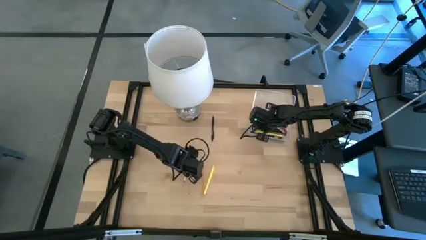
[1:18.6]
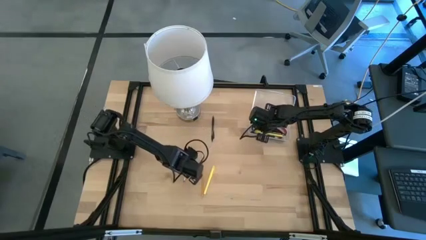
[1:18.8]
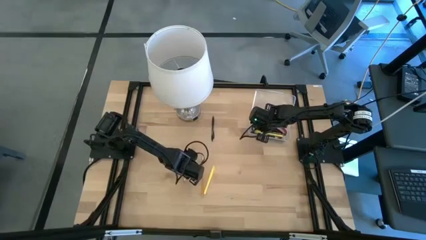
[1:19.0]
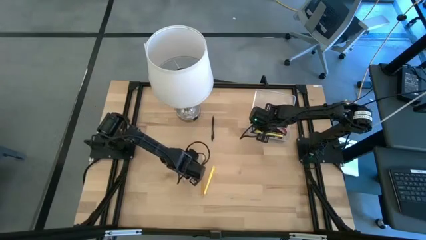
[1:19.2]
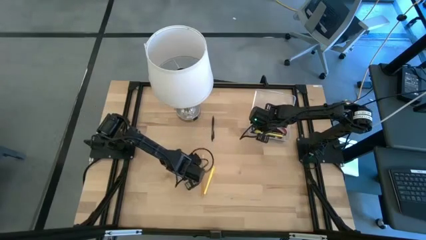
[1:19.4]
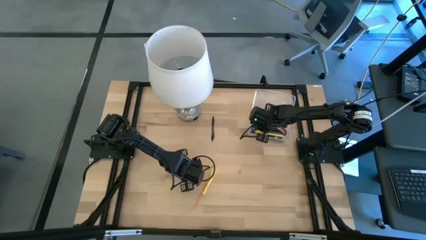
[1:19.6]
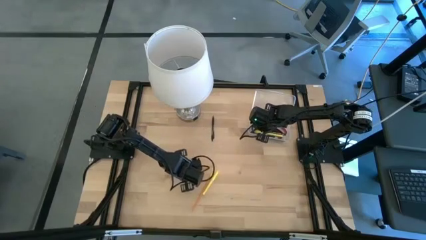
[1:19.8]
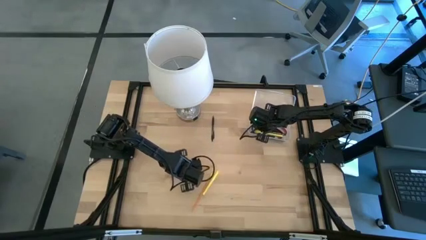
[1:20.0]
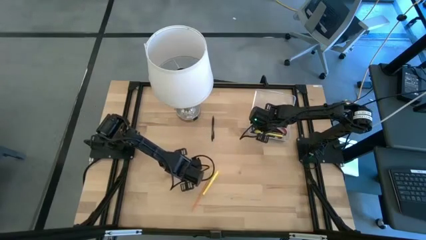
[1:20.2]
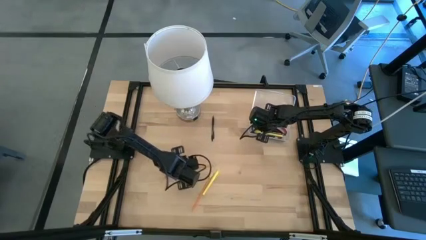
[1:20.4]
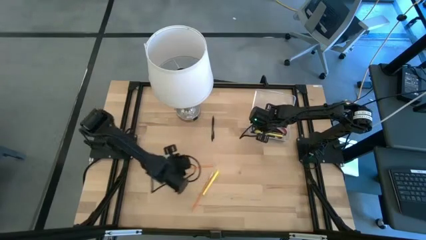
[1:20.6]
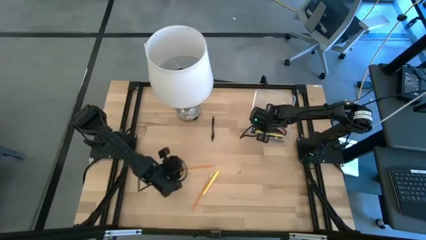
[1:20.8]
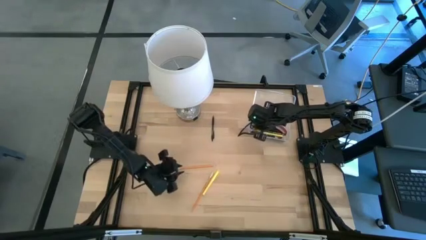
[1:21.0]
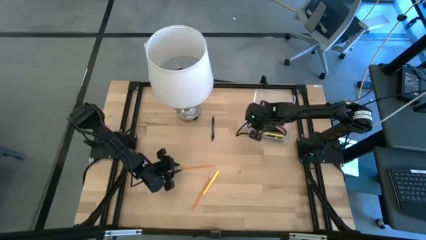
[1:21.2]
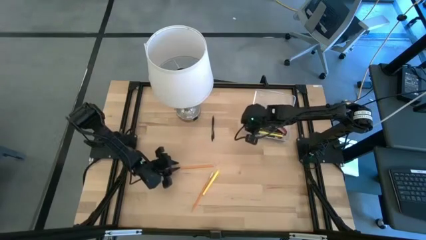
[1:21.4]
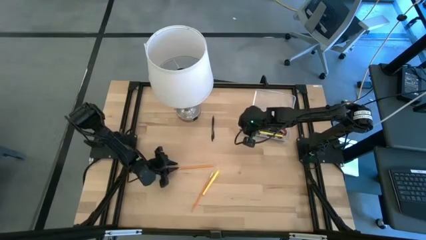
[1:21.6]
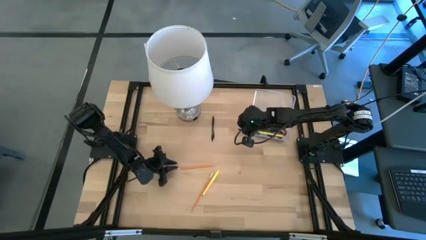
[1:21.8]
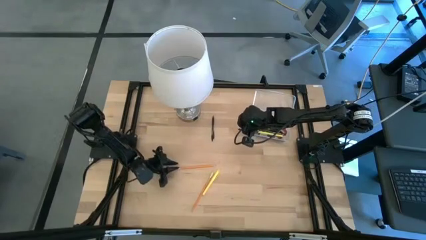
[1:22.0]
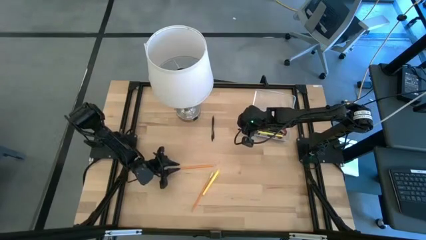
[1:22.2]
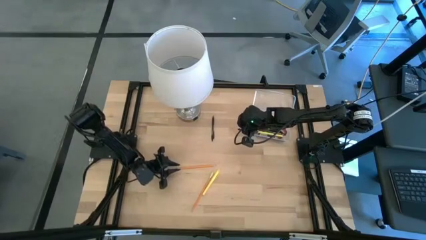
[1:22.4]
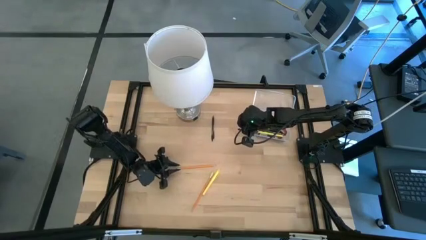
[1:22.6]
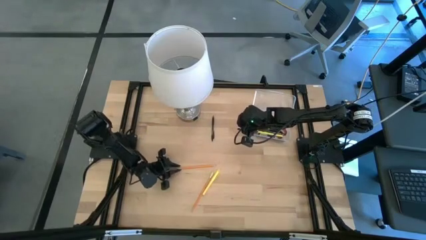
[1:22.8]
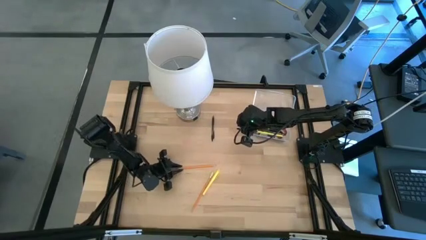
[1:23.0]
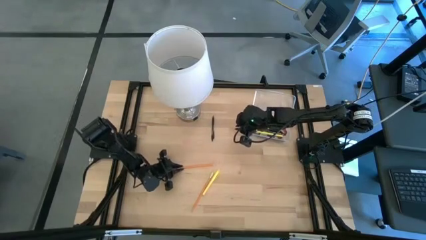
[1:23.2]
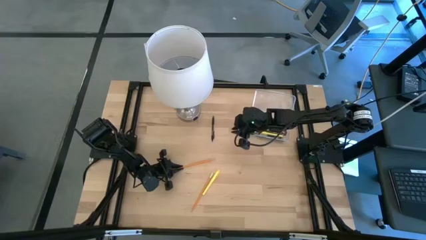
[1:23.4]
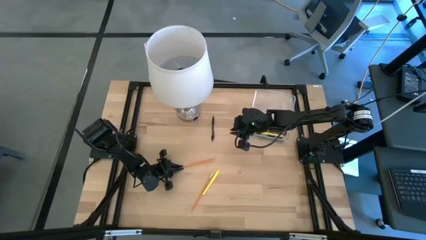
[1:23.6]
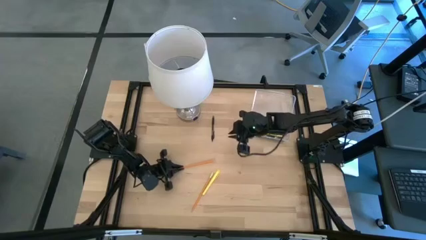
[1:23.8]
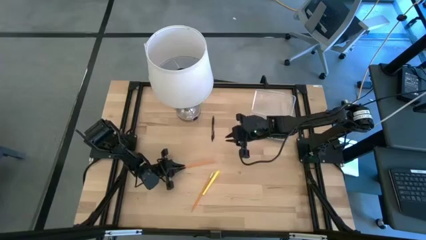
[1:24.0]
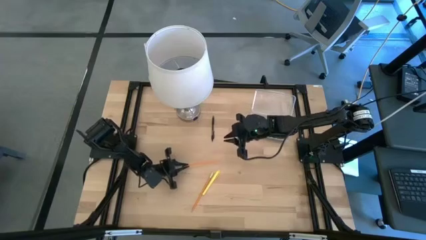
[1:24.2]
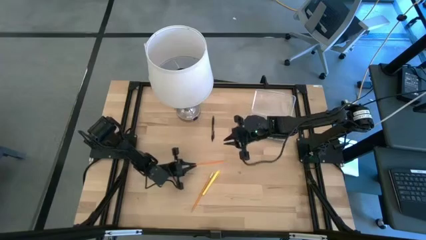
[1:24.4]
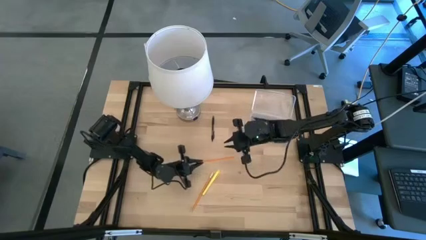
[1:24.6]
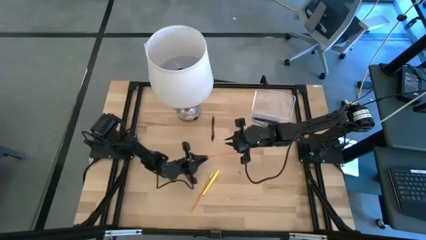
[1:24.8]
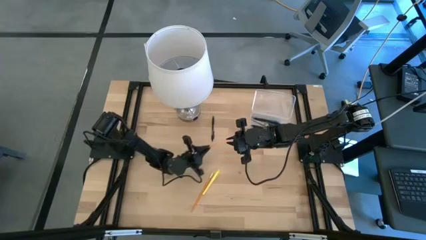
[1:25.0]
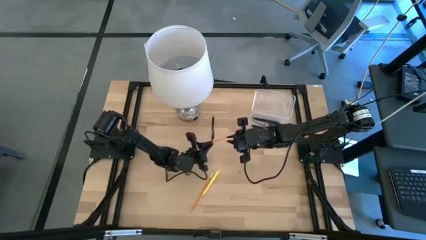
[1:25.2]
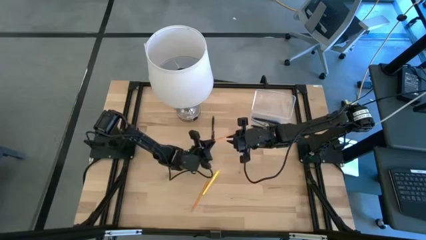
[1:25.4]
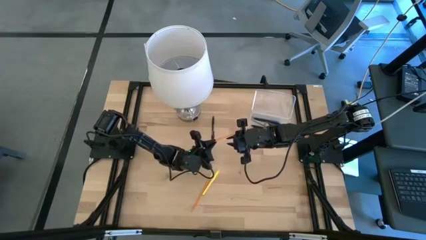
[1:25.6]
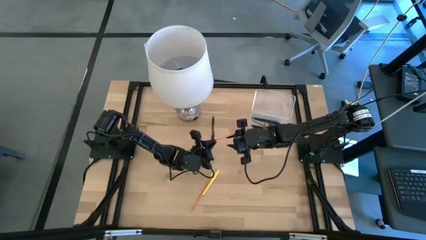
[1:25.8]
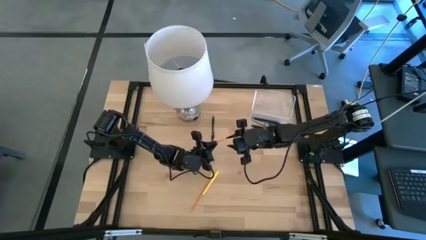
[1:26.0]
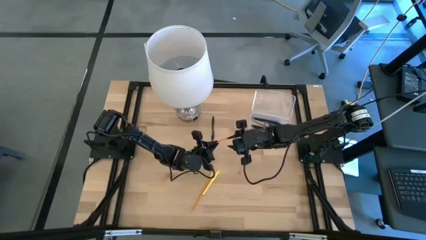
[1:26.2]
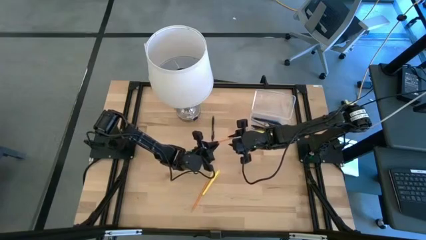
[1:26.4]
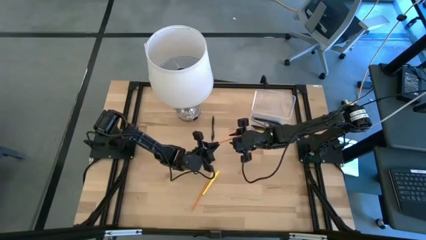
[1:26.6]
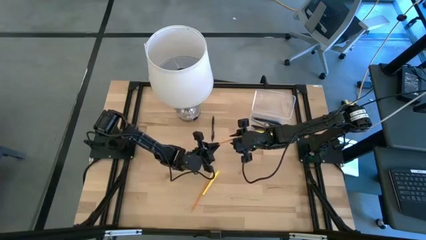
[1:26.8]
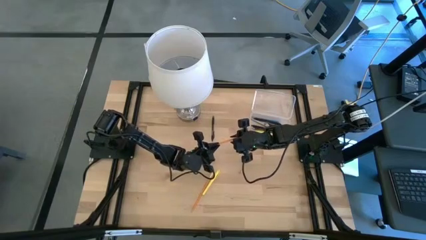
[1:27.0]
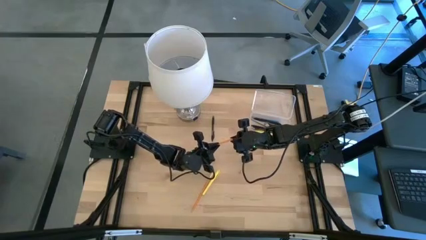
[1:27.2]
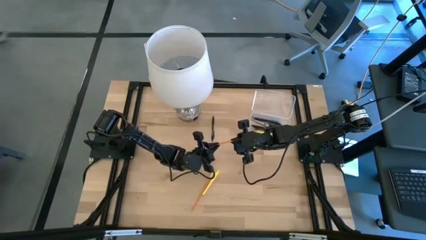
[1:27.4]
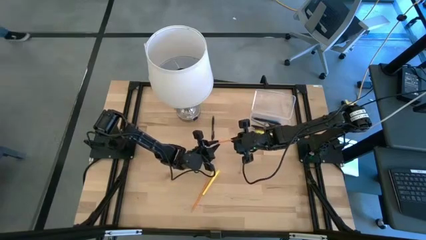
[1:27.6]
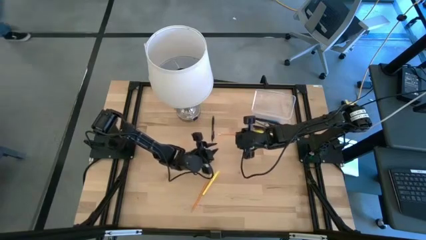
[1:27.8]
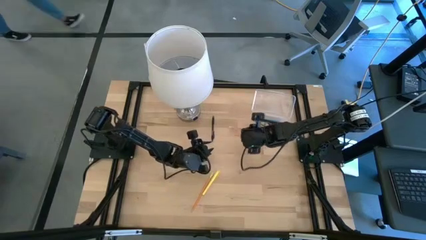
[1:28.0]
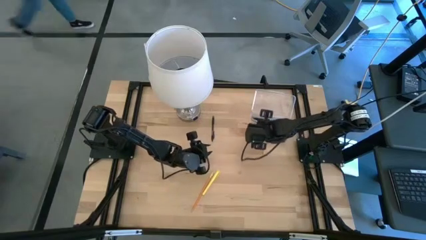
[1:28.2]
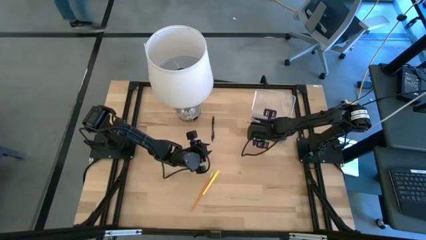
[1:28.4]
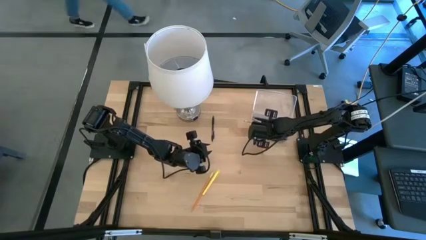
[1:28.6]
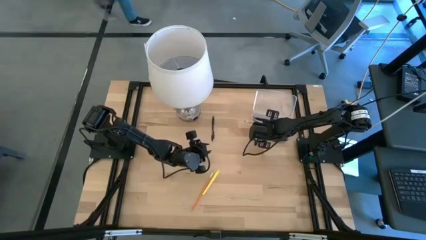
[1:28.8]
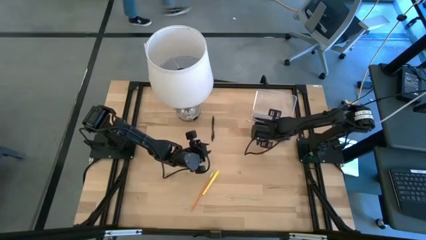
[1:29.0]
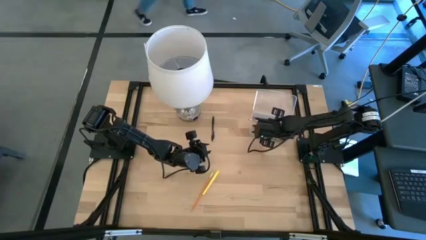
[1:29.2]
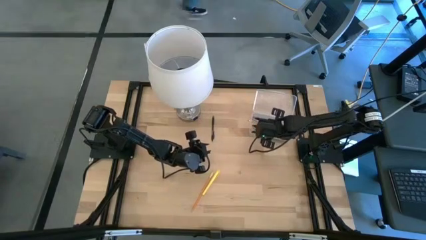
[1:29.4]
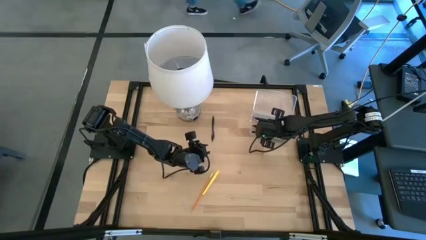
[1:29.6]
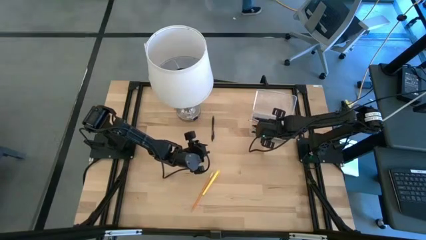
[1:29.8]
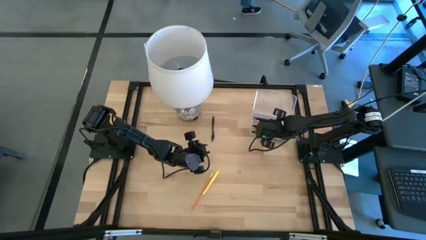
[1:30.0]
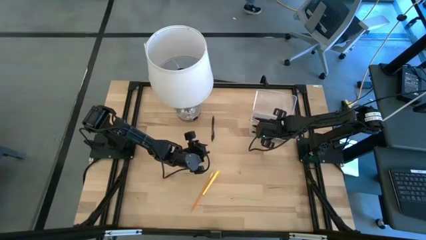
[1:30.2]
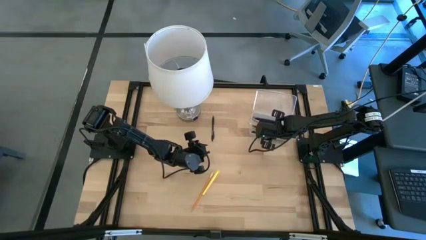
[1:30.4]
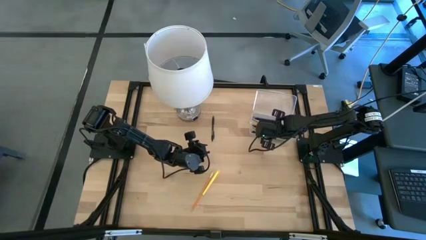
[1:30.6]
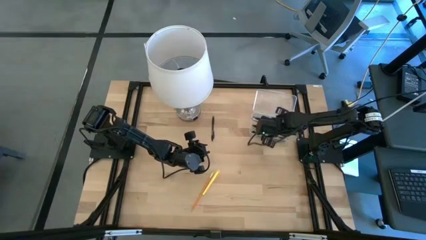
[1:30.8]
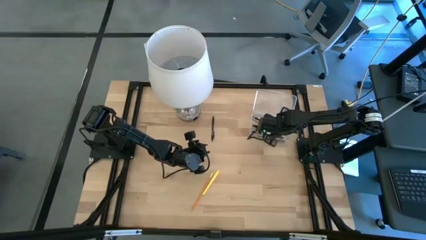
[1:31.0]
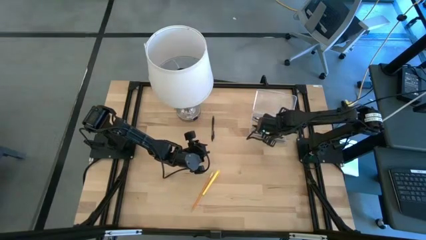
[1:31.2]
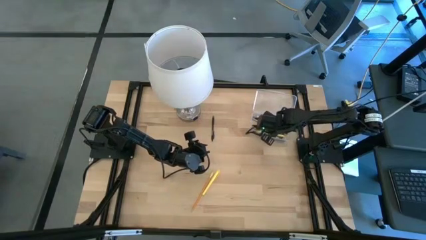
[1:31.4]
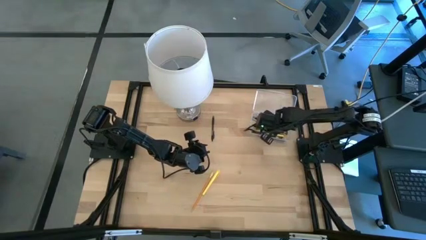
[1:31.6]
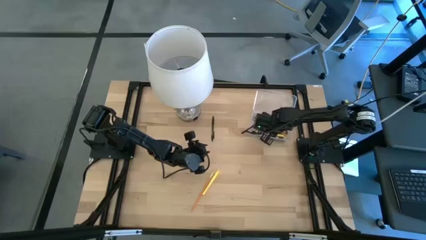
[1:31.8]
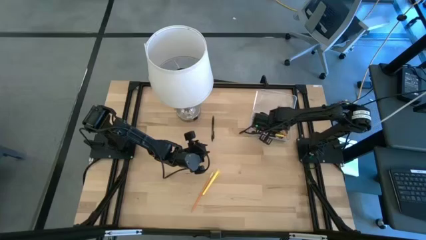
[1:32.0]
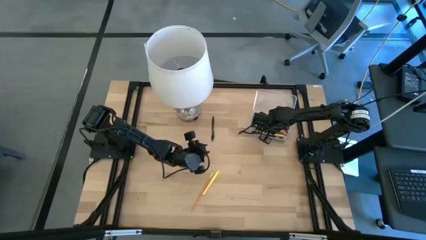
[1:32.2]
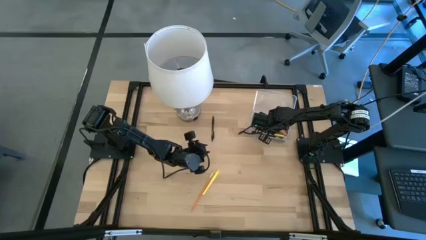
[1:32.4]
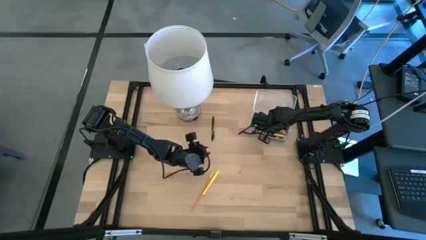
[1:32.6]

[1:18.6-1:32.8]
Task: Pick & place school supplies into a supply box
Put the yellow pencil into the transparent supply box

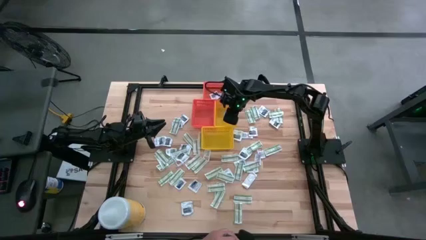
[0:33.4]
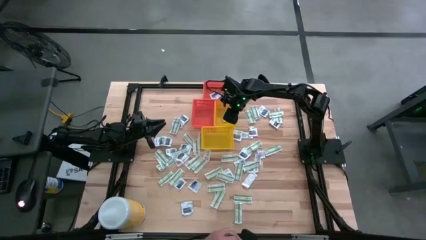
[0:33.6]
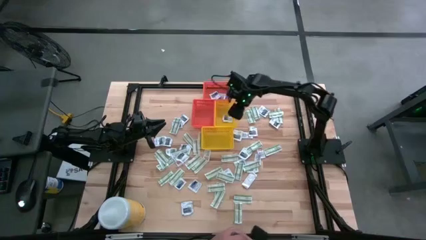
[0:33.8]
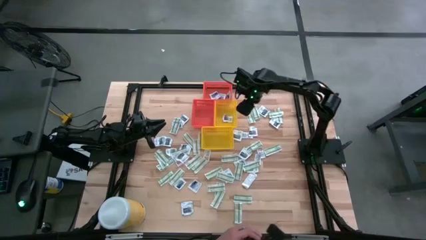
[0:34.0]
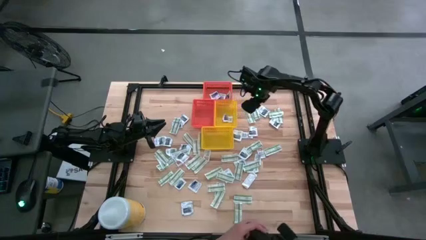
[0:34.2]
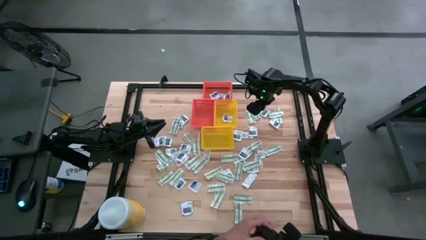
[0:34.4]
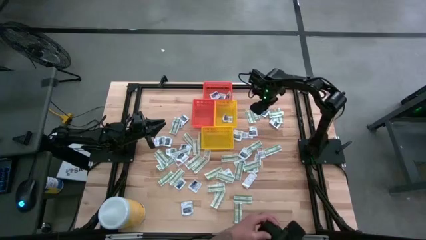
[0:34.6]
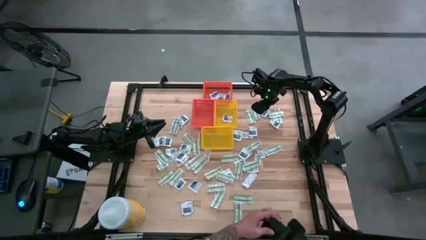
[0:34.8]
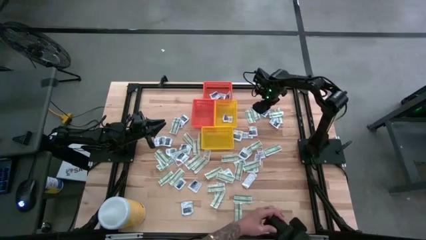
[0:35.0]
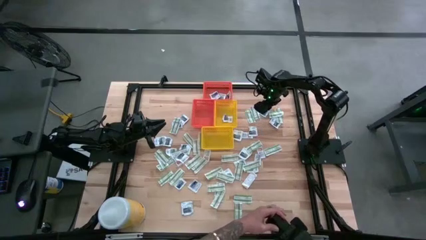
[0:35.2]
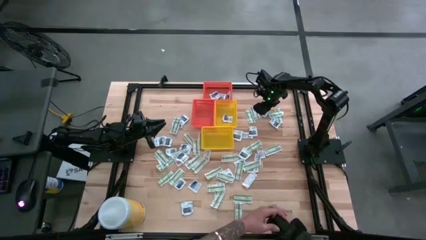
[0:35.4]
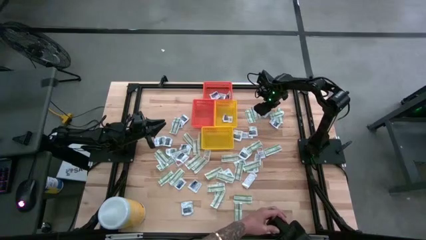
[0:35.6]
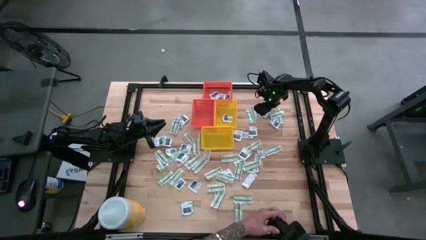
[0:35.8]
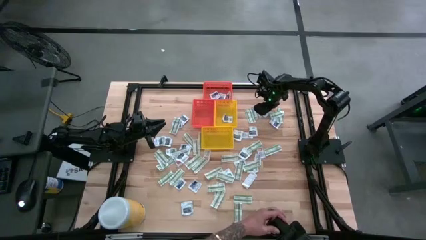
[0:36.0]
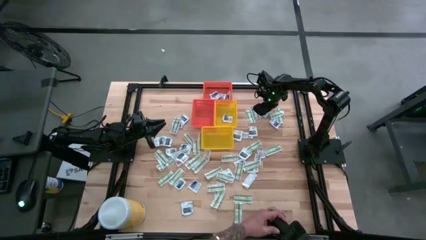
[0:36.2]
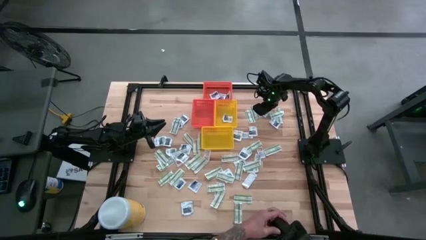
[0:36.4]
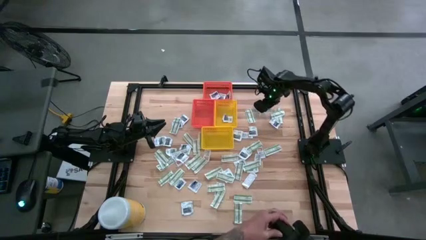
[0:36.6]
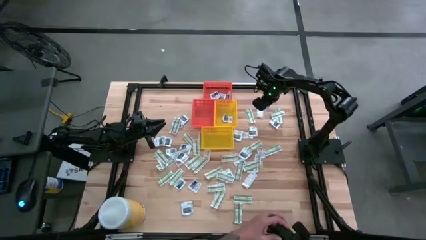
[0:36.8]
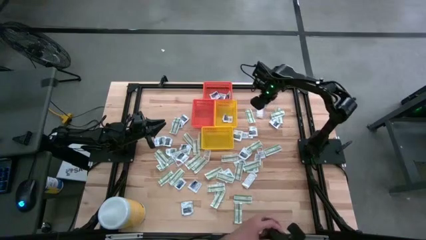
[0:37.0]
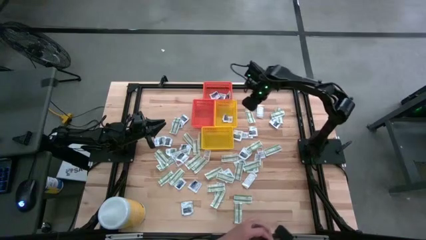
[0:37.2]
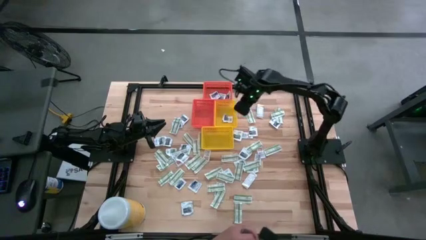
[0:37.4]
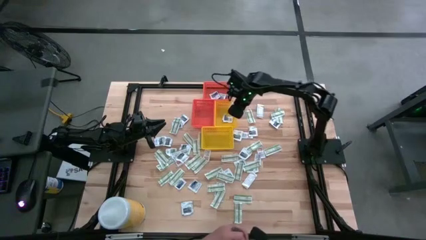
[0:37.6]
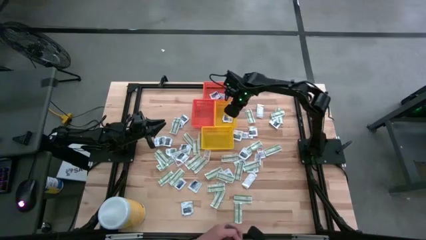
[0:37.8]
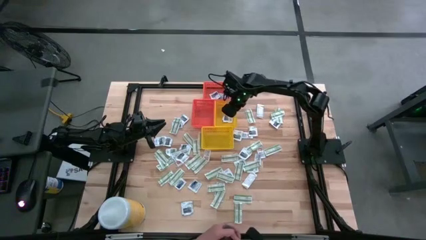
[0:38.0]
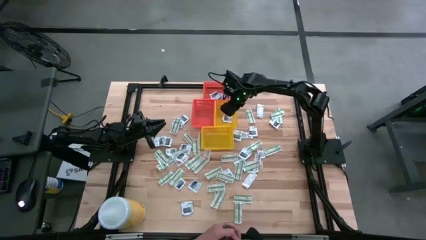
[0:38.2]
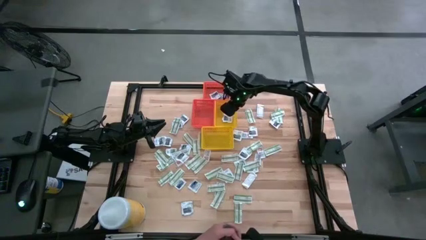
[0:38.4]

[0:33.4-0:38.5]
Task: Pick & Place First Aid Supplies
Put the towelette pack into the top yellow bin
